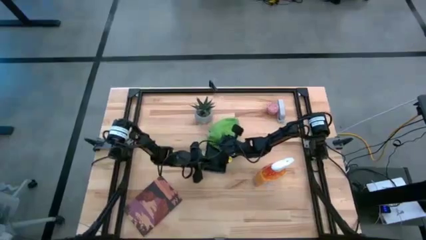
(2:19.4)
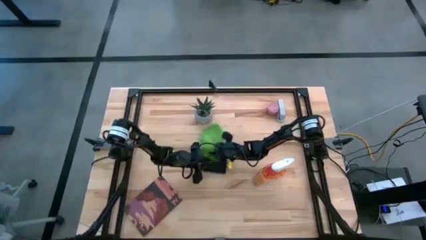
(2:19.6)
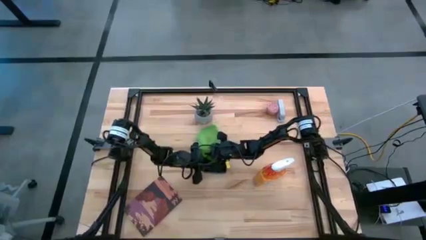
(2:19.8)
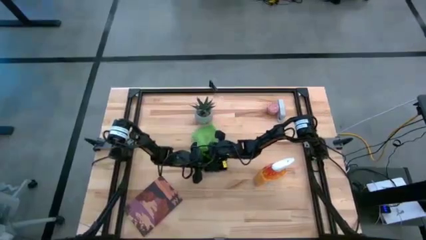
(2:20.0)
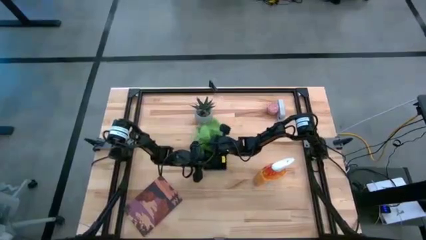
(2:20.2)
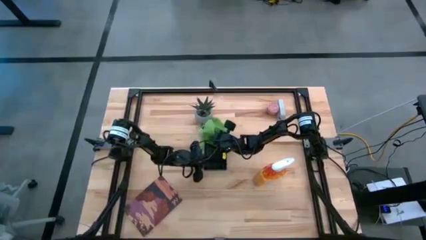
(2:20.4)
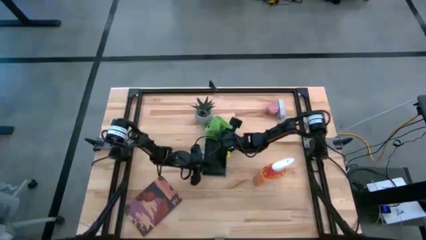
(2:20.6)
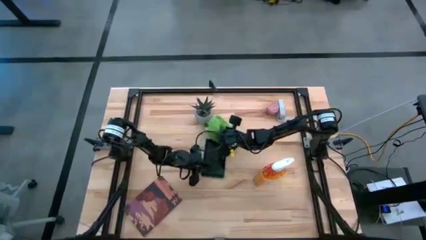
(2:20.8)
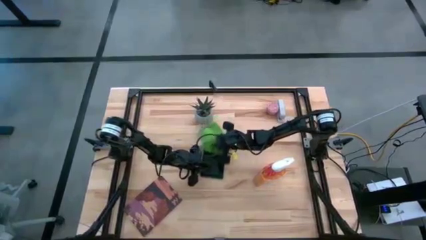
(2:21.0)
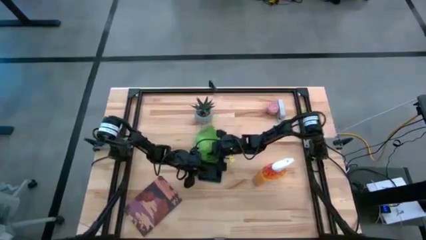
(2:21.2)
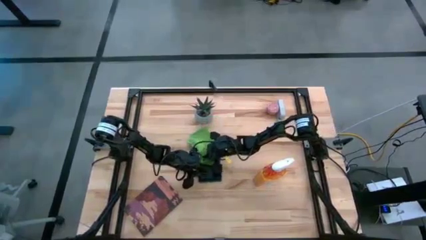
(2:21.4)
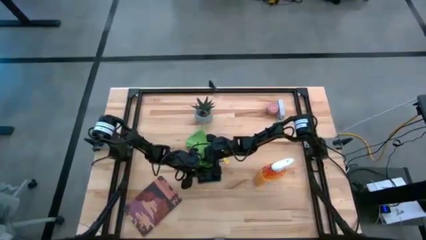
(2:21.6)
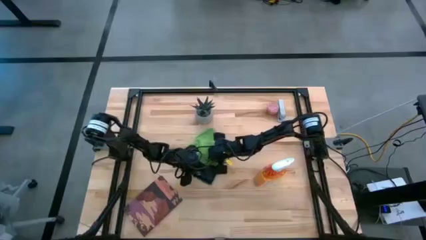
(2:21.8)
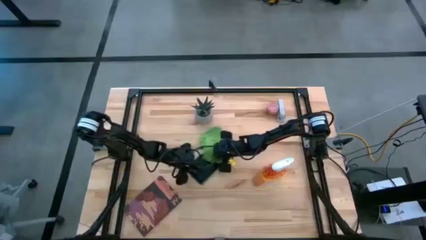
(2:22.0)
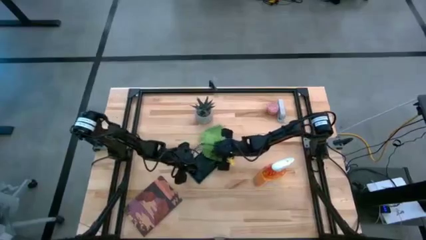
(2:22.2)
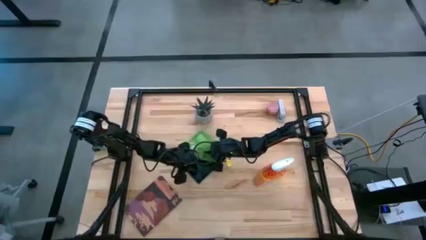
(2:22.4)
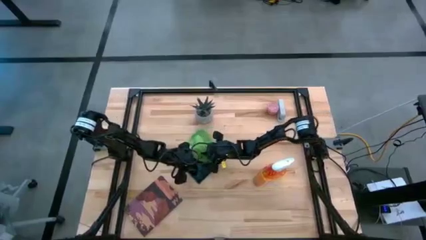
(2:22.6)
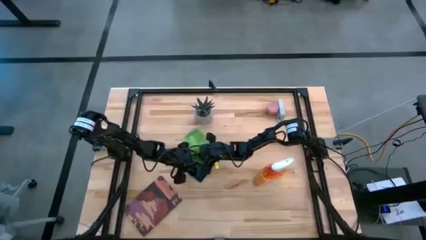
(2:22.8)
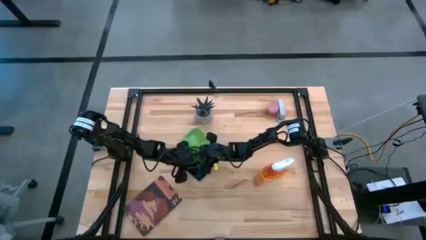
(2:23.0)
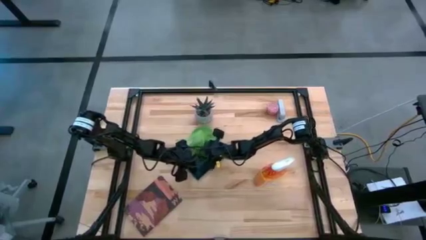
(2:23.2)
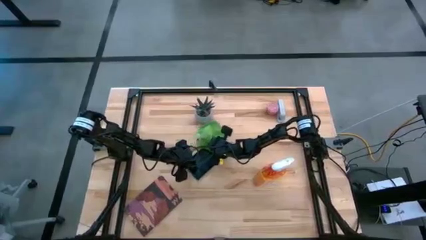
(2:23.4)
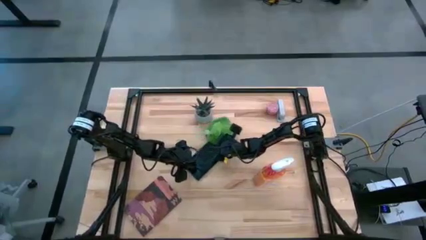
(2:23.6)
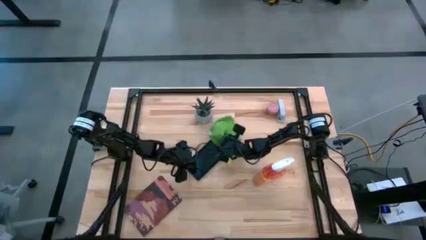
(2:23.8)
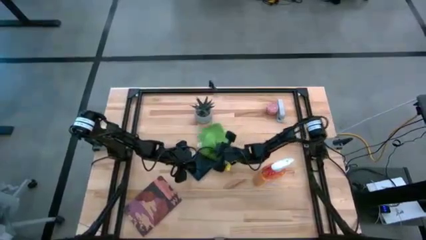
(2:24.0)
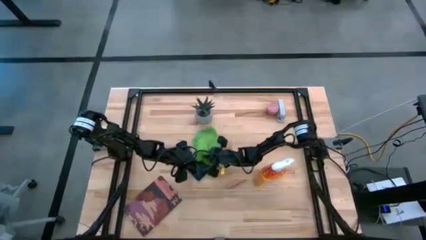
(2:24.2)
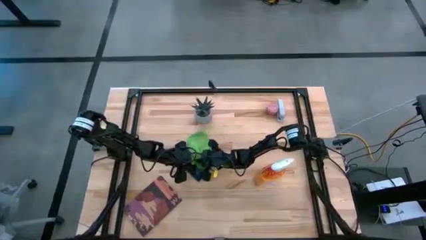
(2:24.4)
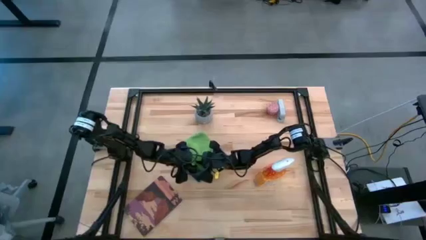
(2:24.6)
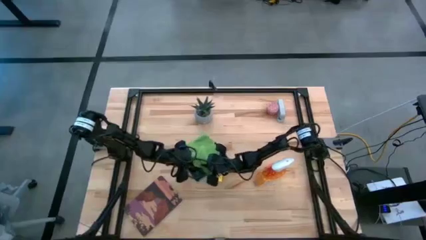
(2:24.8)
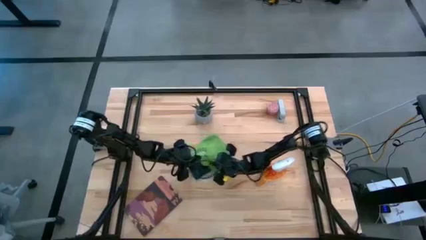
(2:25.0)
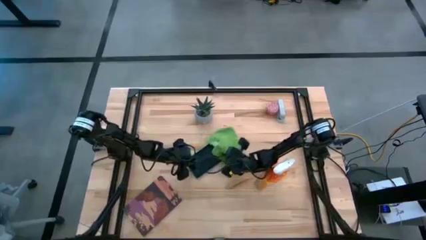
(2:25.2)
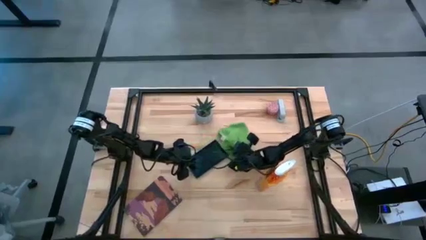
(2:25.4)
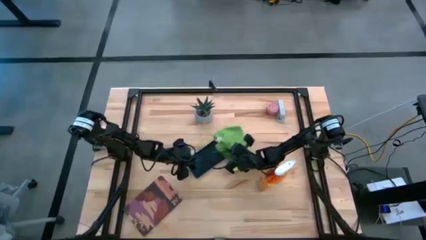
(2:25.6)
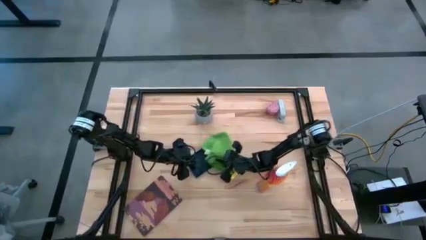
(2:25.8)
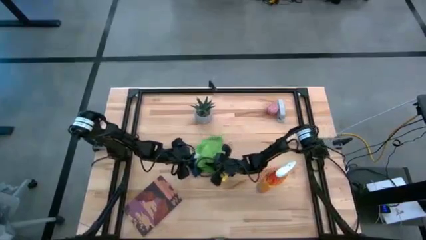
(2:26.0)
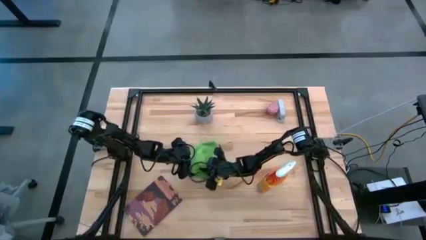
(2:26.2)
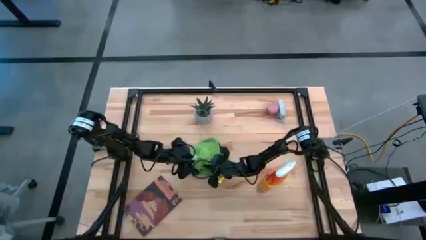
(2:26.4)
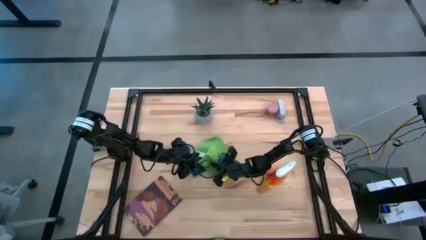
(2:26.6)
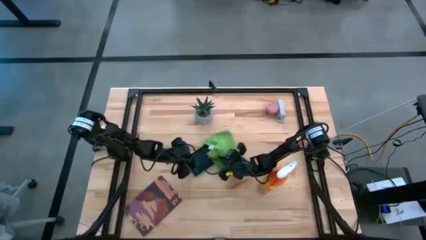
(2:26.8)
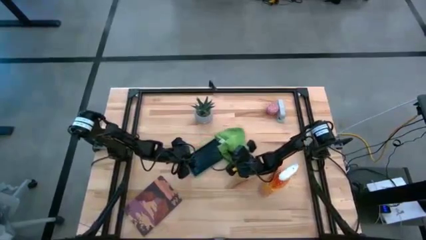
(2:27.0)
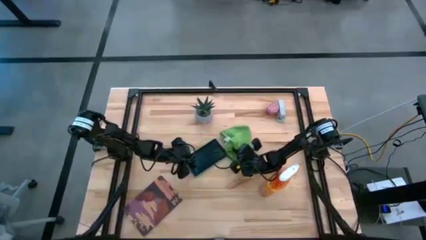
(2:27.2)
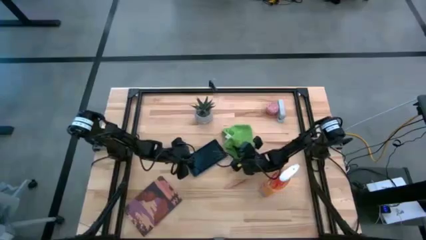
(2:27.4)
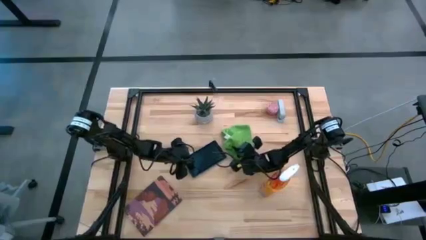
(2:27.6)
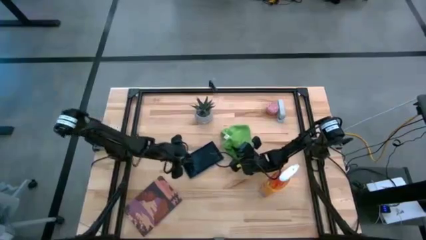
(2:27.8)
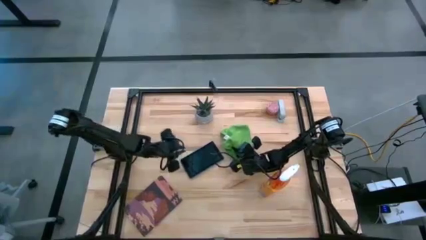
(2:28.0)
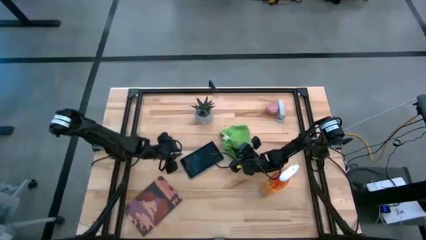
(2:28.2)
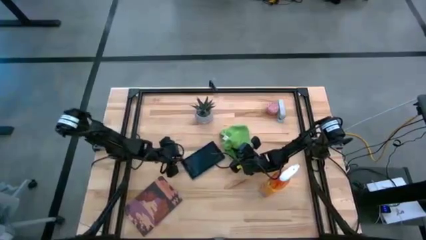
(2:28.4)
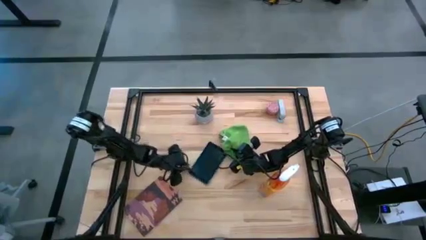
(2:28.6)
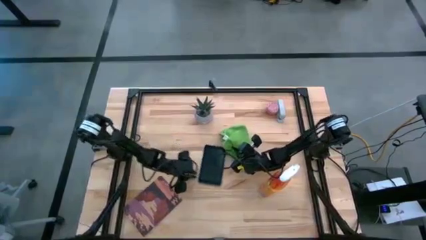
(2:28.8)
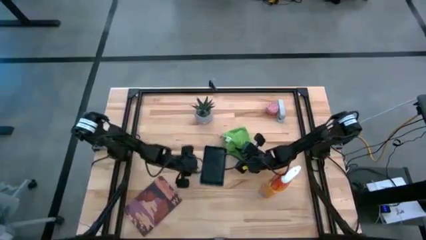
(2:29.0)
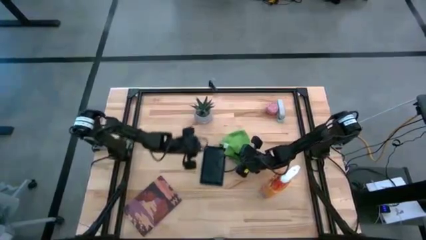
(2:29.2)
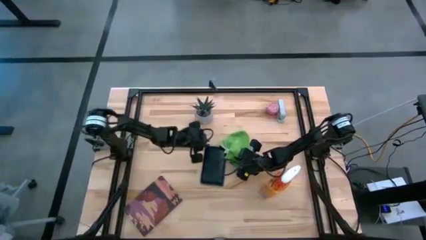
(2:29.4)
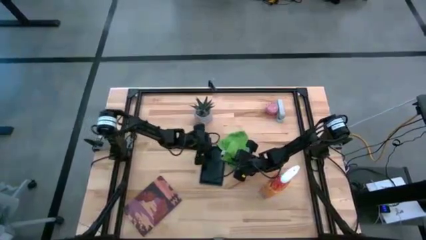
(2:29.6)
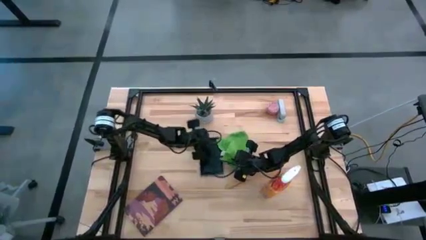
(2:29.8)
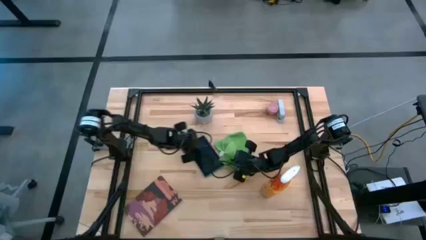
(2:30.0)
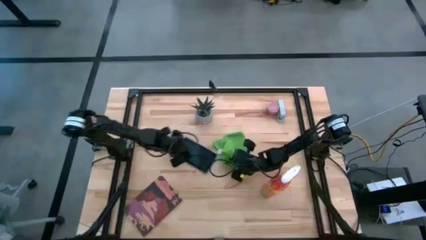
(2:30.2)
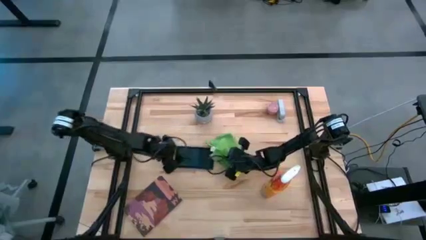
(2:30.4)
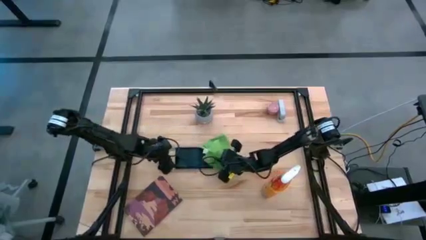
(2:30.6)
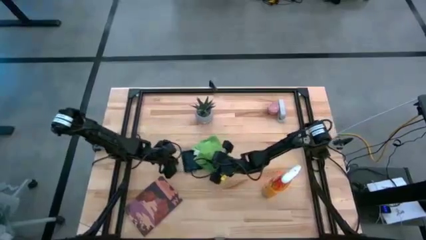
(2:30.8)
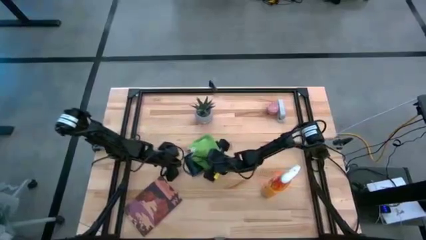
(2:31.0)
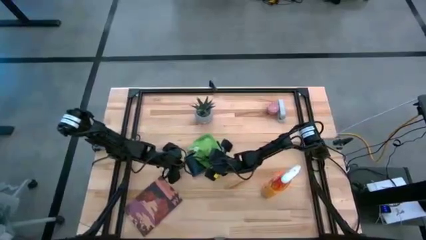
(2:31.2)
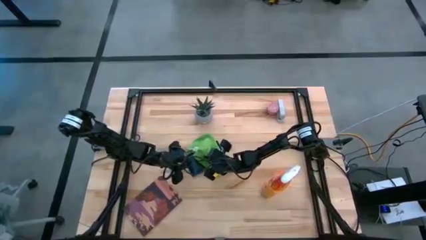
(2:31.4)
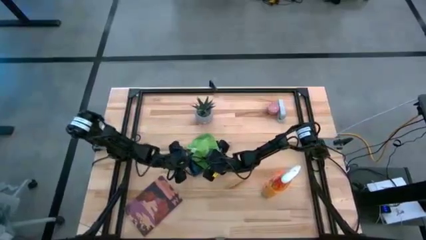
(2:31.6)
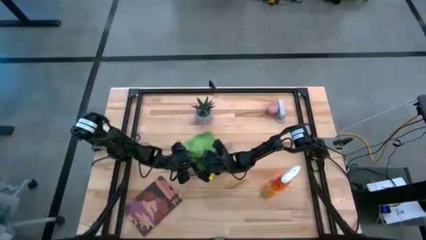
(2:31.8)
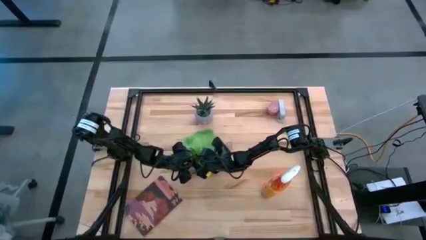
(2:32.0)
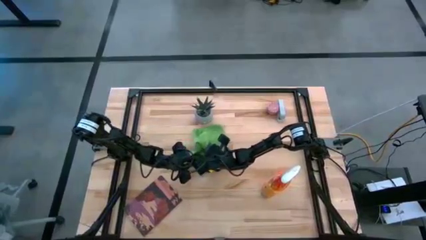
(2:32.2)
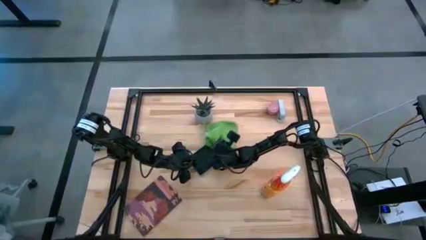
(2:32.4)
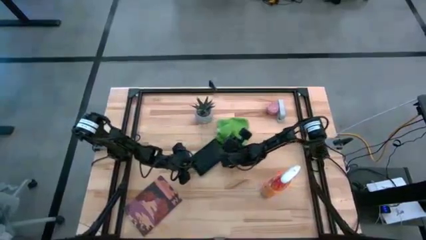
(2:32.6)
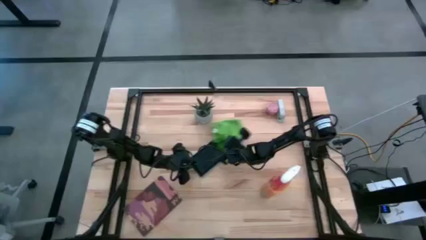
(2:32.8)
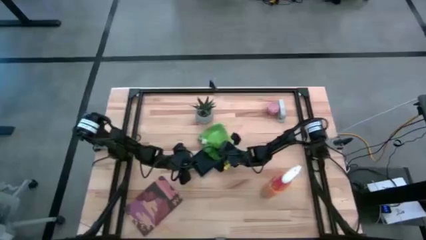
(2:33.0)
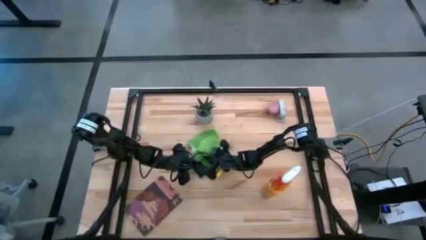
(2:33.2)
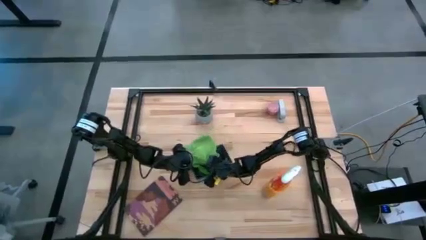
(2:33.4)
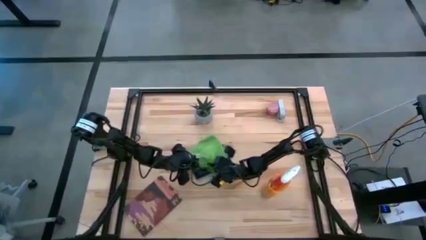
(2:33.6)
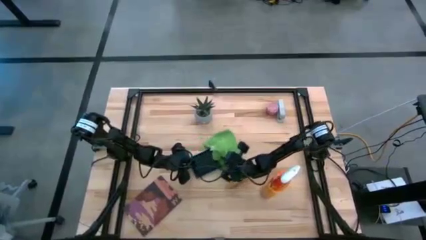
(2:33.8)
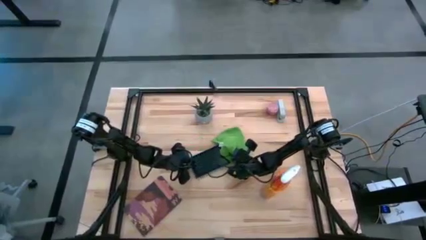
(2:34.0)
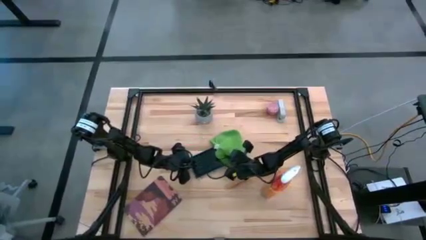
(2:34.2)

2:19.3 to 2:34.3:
Task: Apply microfiber cloth
Wipe the front of the tablet with the microfiber cloth

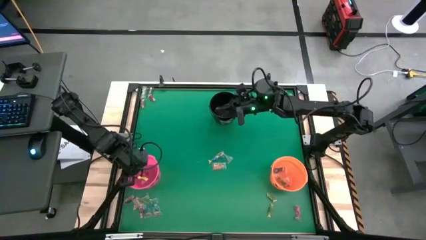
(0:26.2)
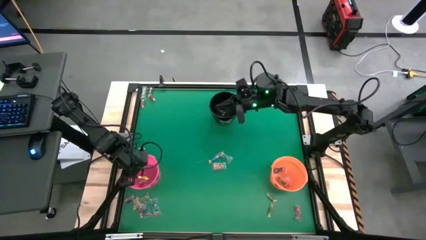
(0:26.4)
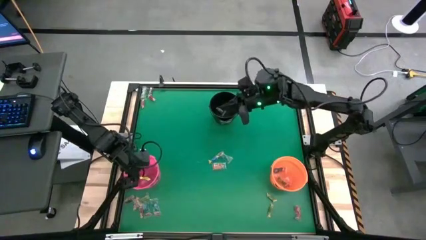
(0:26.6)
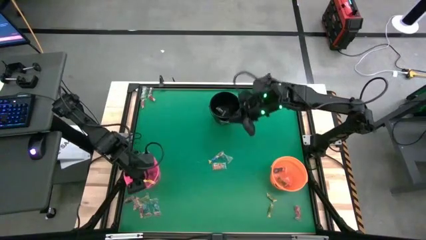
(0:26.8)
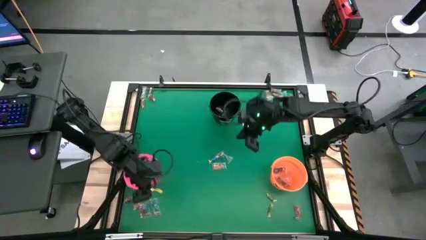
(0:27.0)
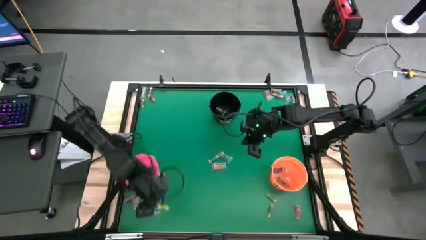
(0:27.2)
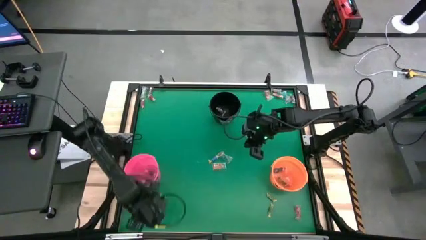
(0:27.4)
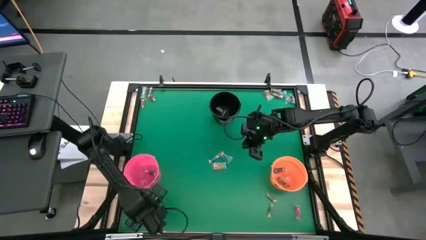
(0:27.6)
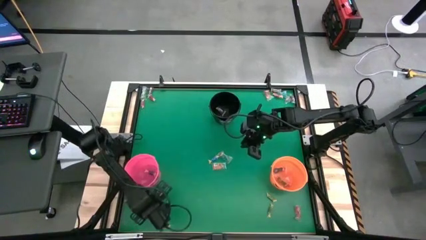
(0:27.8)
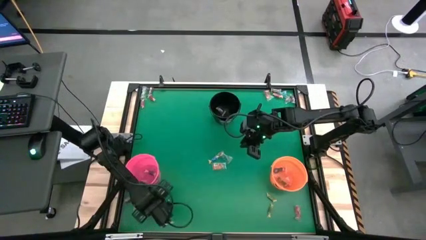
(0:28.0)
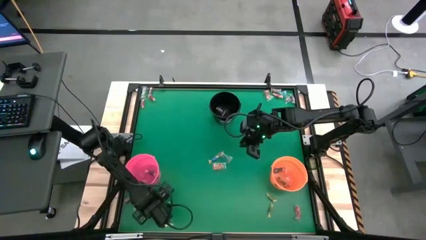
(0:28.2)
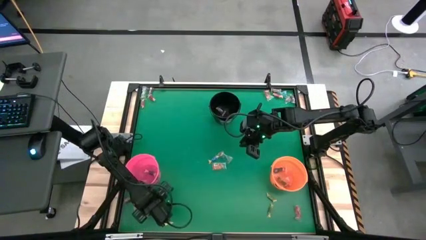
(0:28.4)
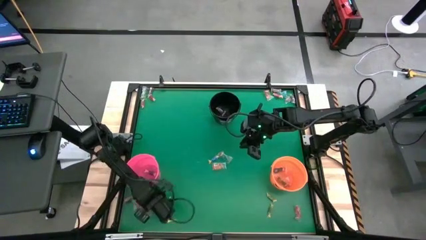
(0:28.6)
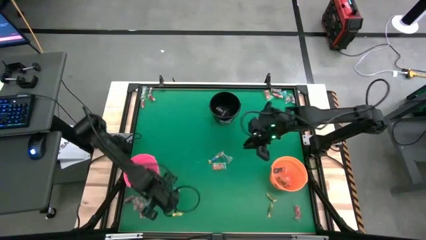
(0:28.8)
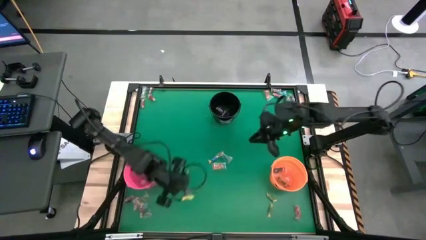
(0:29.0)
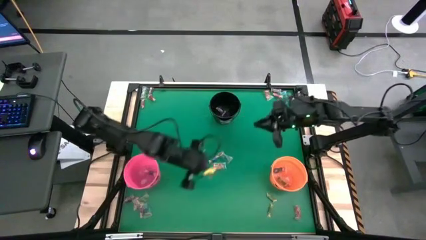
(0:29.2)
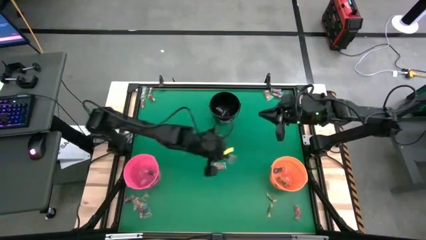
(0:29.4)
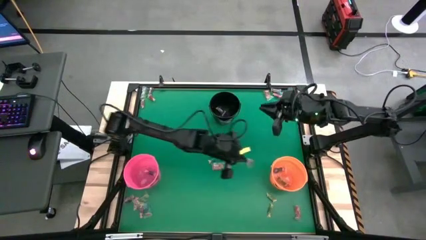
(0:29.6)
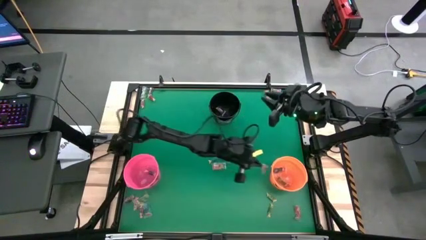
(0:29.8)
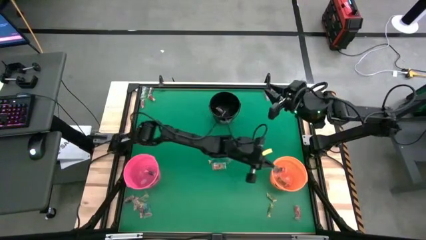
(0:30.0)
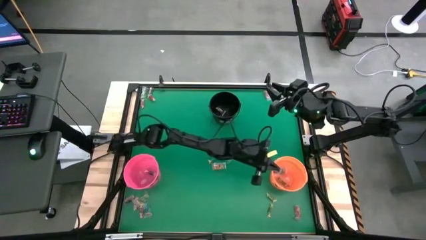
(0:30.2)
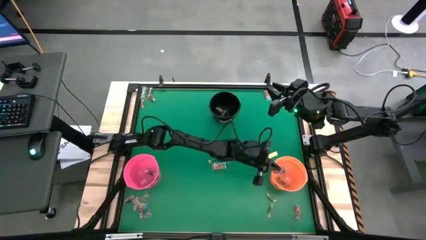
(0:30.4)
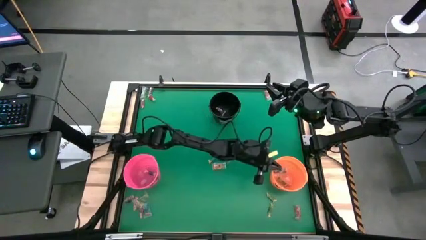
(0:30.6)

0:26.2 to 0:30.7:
Task: Sort candy by brand, put in halloween buckets
Put the blue gummy into the orange bucket
